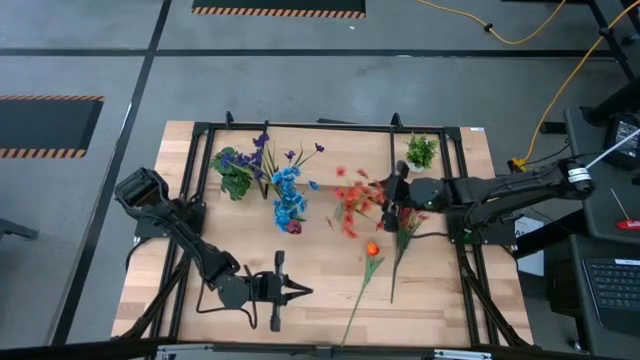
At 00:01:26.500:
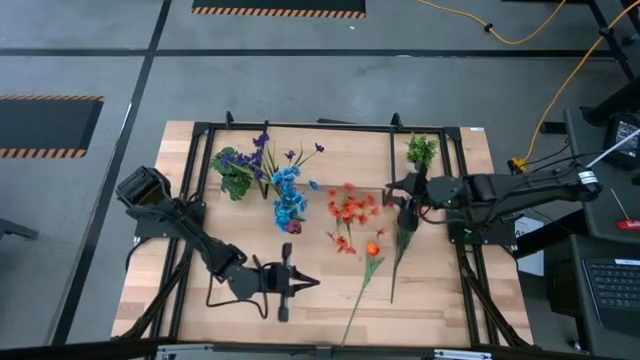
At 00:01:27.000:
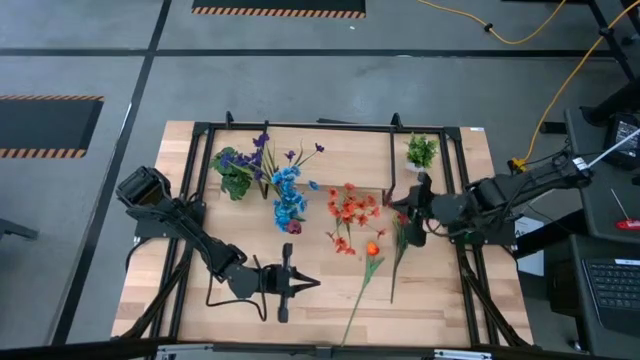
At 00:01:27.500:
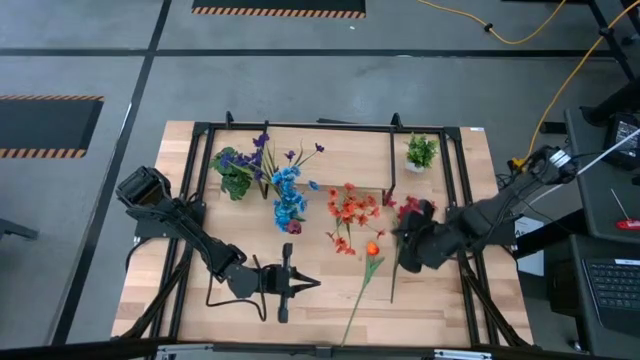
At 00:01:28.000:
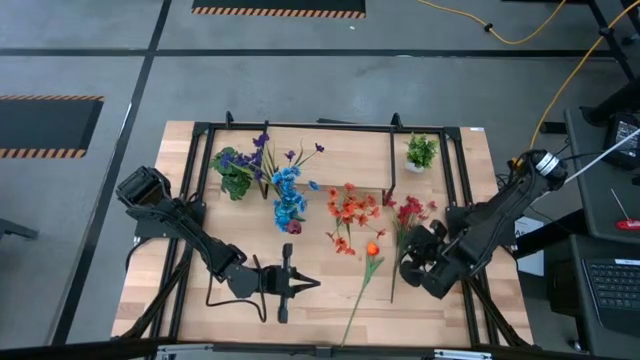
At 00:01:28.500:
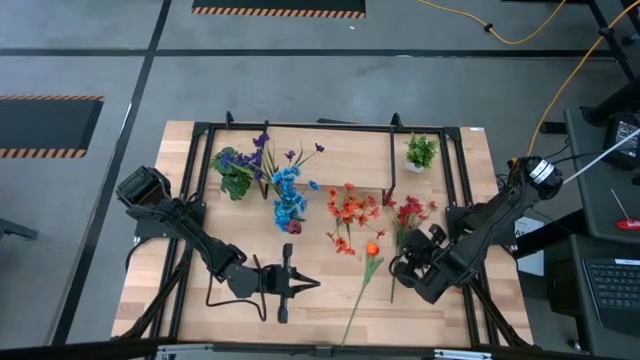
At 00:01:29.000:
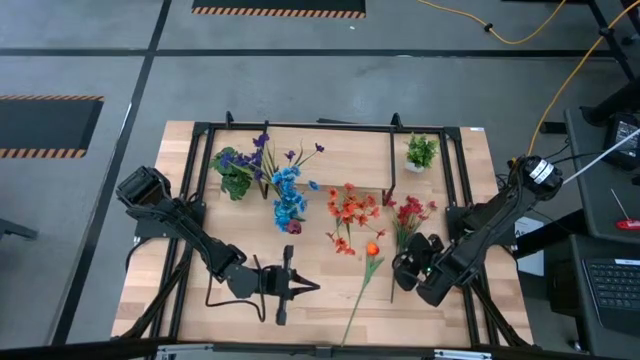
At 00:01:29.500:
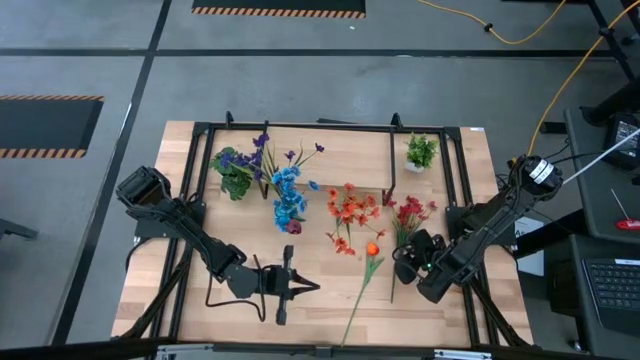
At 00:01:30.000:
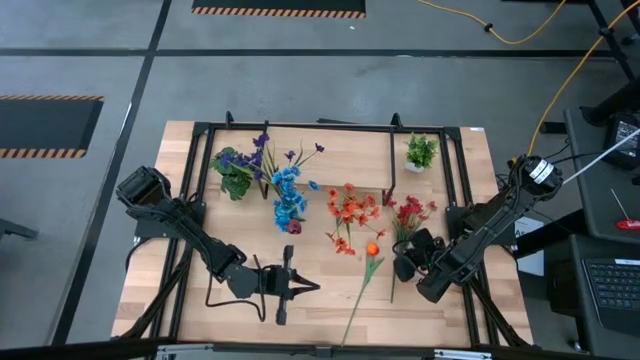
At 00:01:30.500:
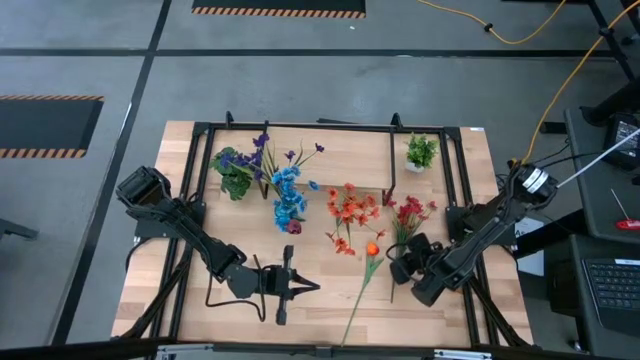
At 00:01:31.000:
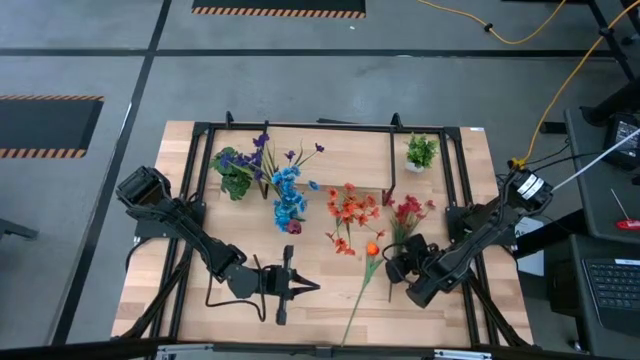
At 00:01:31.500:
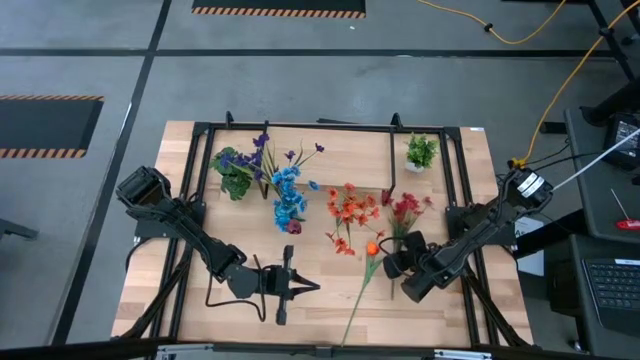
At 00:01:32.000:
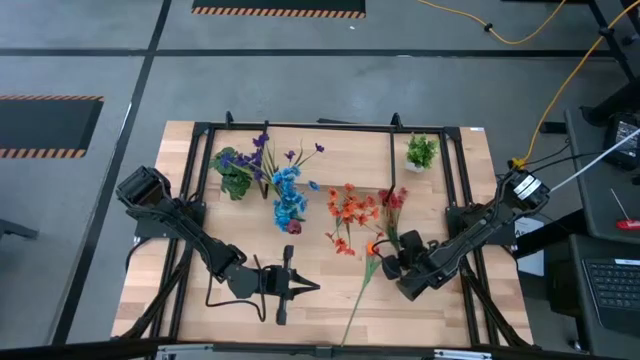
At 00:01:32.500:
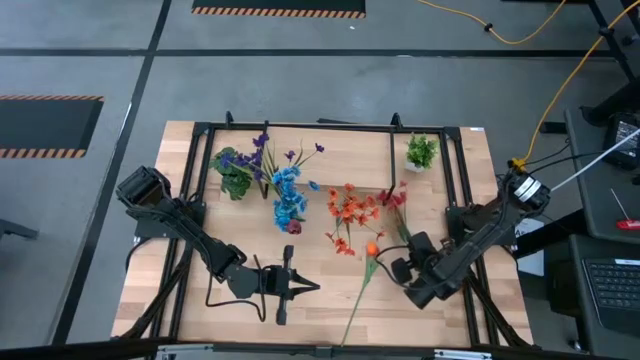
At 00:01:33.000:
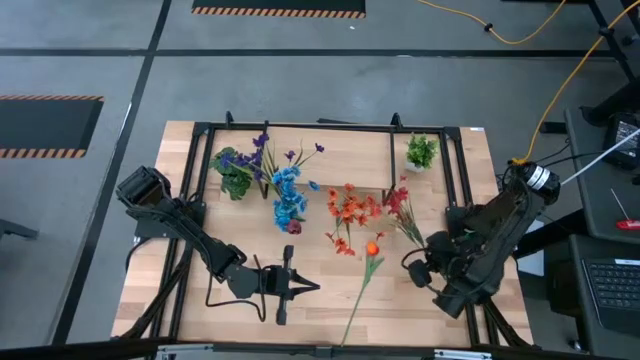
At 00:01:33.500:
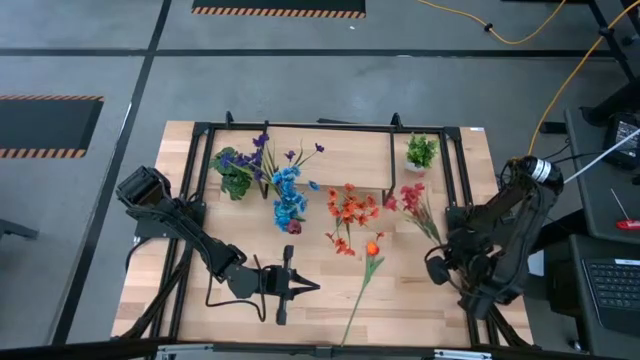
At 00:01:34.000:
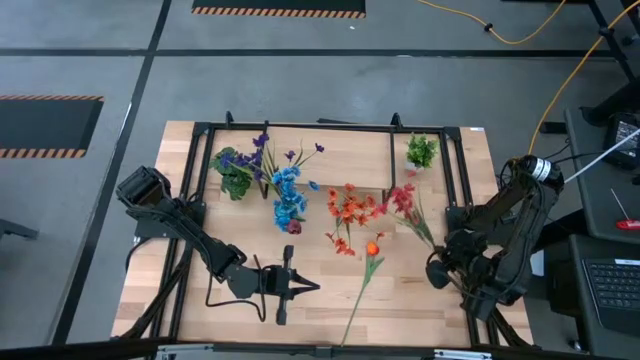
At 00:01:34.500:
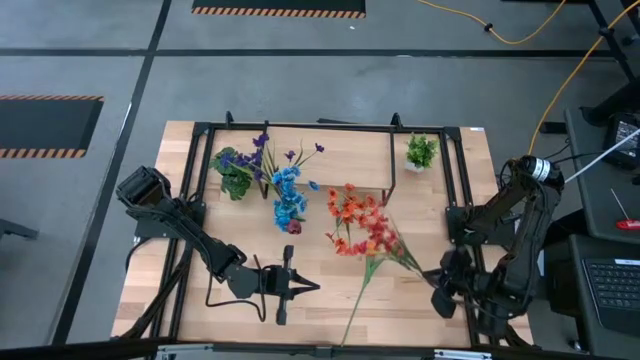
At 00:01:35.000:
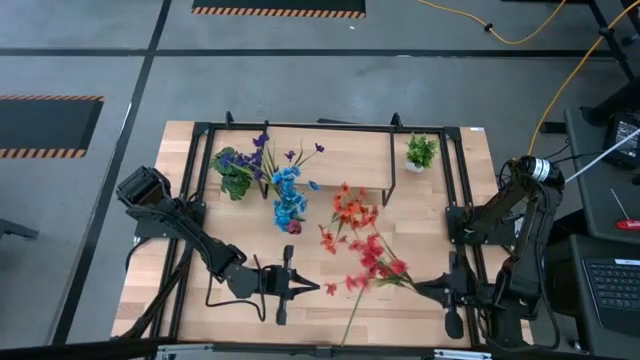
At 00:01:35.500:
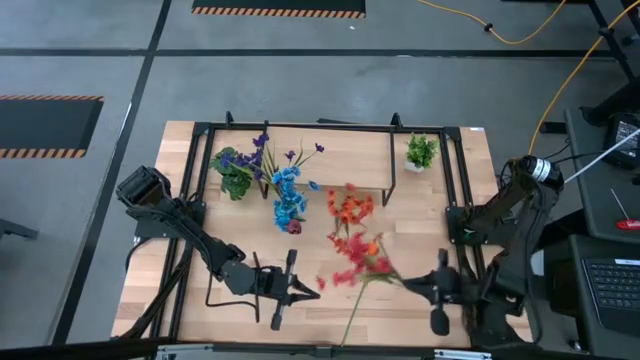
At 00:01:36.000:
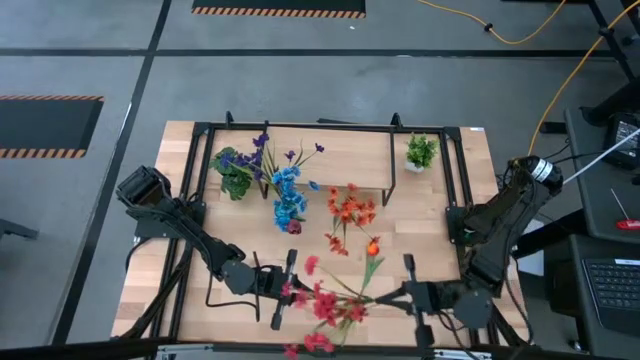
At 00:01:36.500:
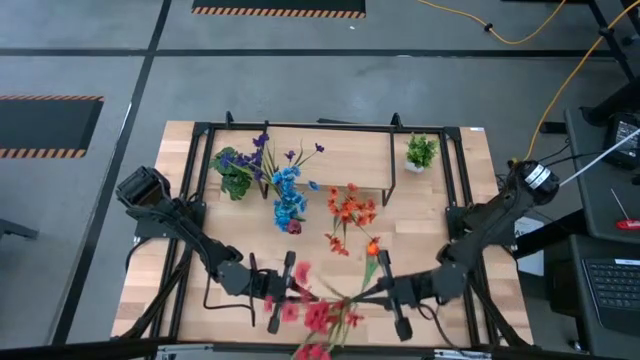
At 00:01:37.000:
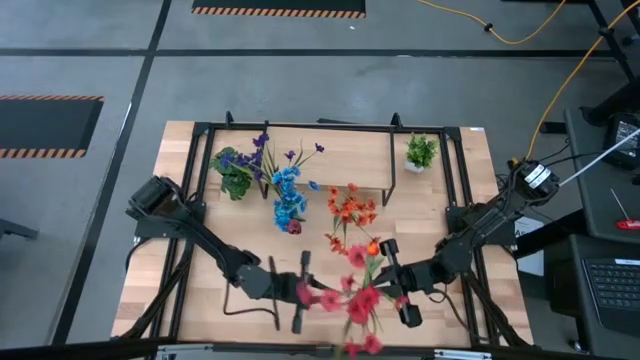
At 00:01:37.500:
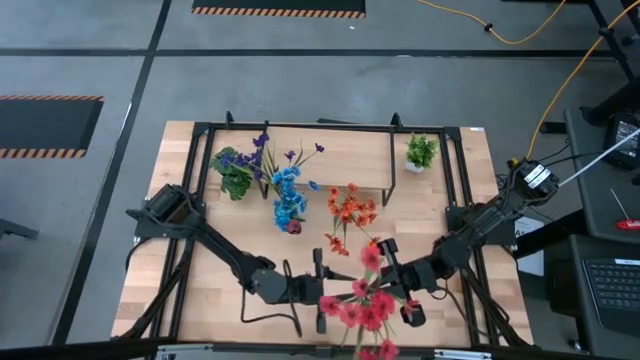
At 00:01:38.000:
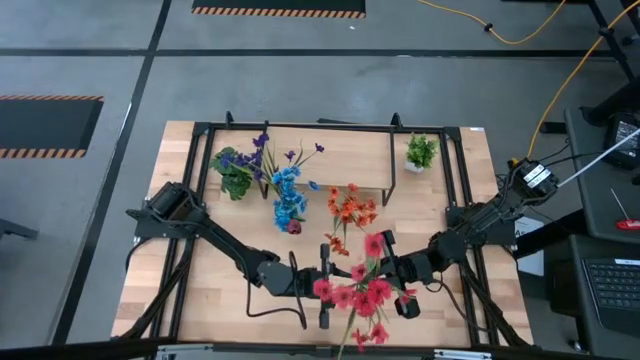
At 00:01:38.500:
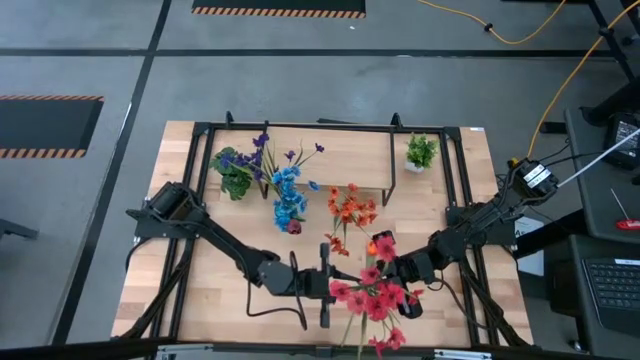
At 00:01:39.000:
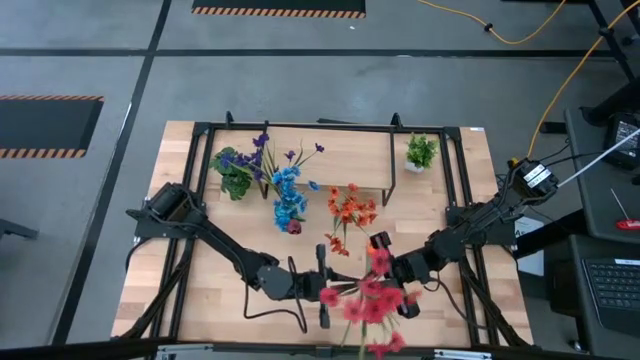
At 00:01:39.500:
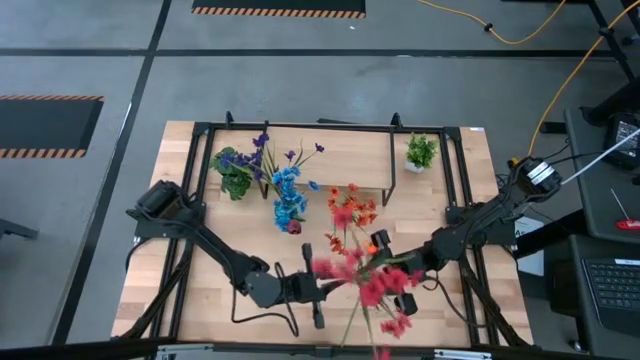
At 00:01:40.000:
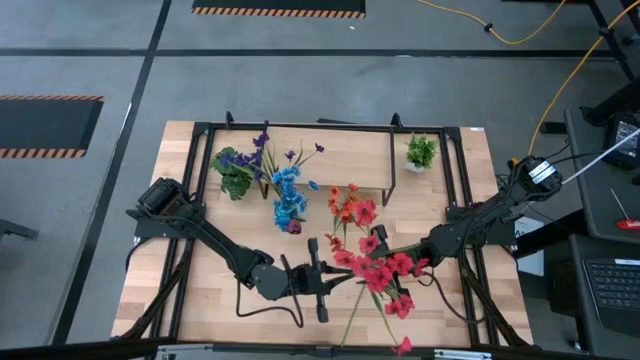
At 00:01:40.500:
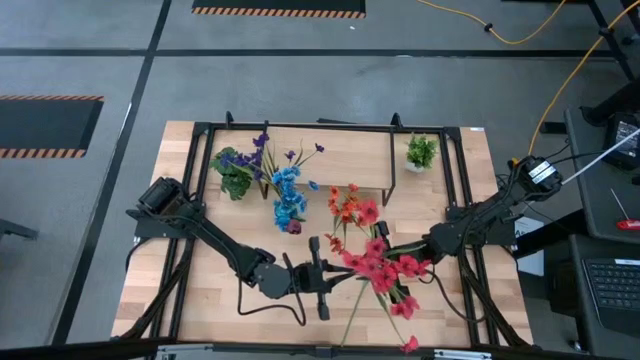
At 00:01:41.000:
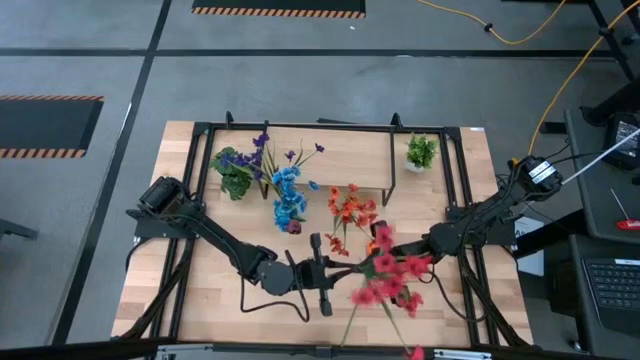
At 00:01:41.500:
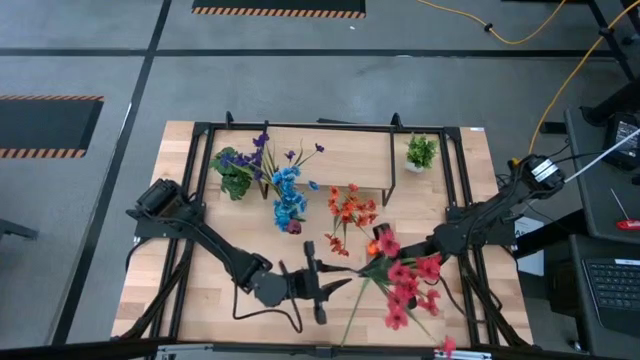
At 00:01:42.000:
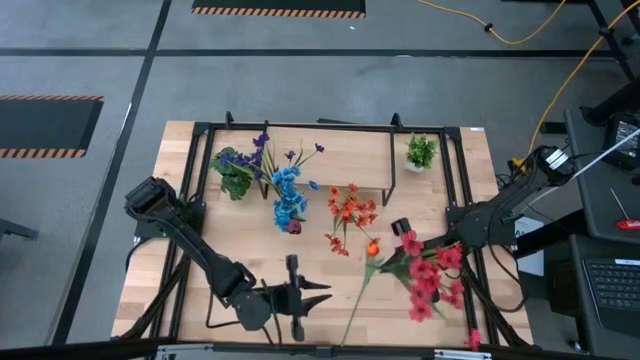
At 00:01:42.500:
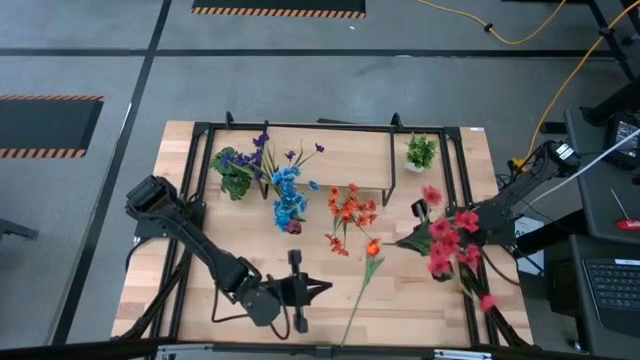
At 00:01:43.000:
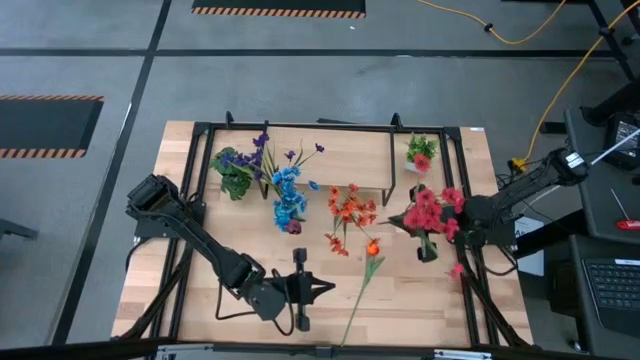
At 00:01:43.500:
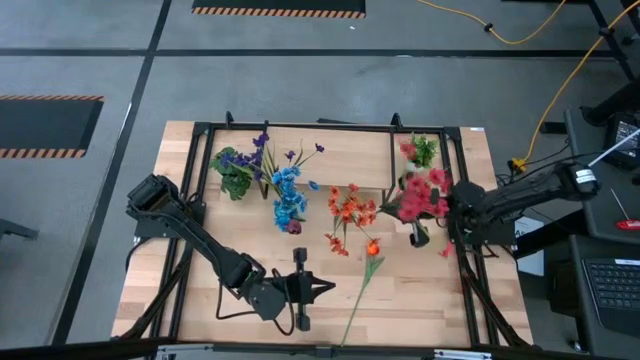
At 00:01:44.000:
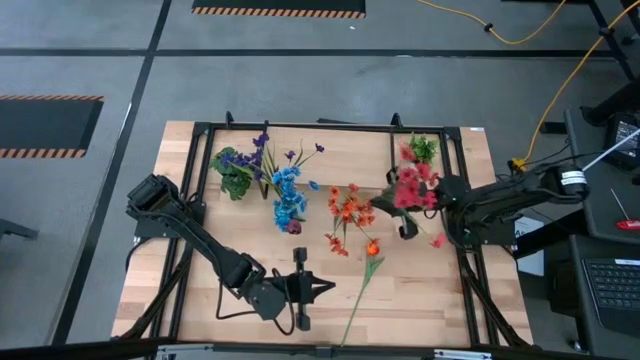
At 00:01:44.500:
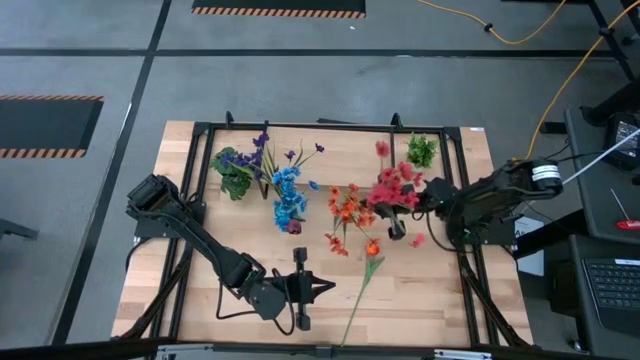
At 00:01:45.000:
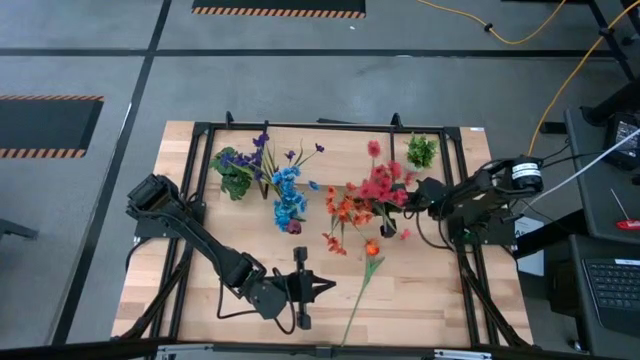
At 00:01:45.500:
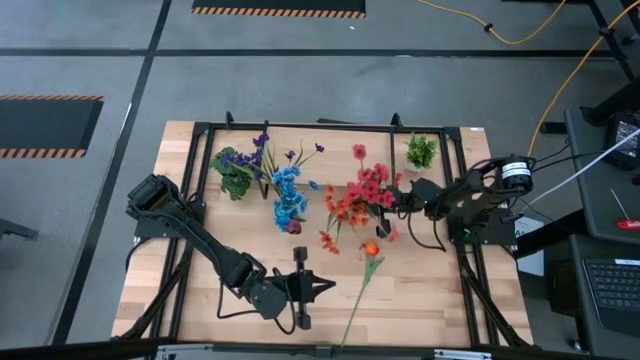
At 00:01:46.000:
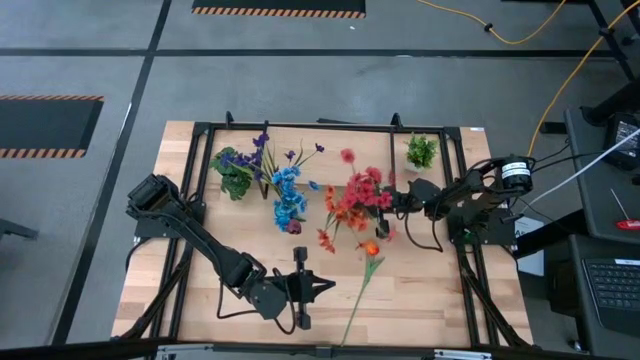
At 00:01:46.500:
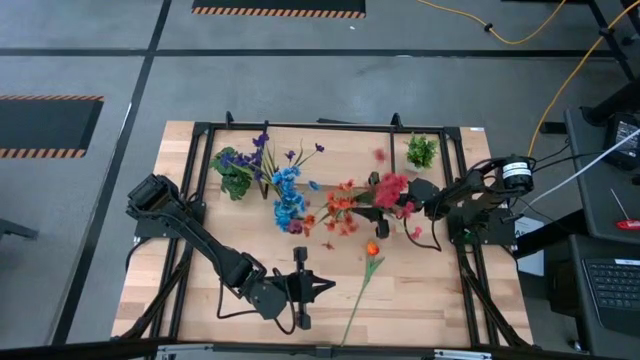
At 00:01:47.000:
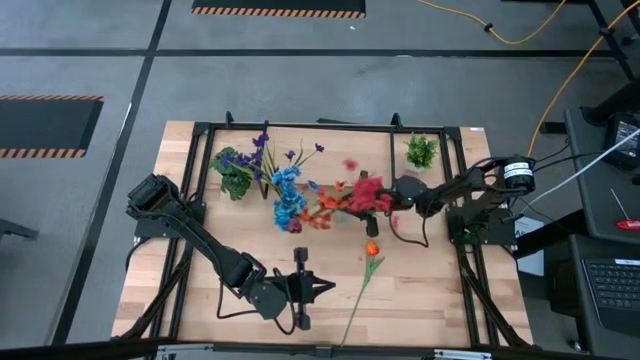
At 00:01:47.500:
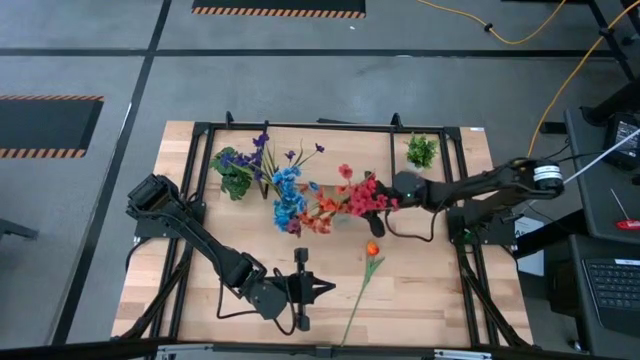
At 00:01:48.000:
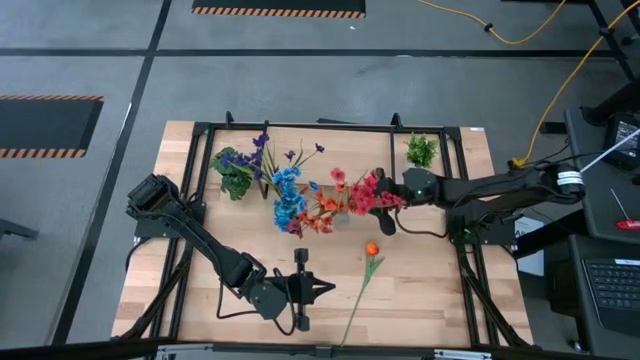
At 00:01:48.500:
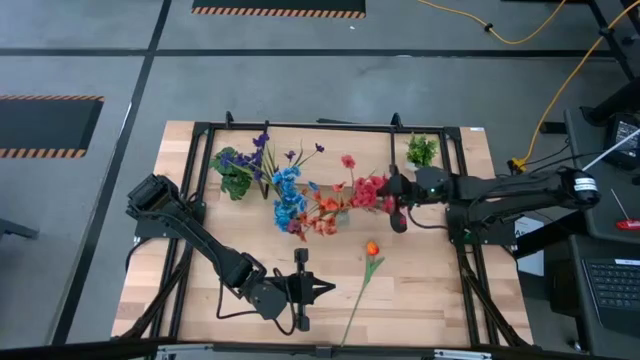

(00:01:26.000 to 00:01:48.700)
Task: Pick and place flowers into a vace then onto a shelf
Put the red flowers into the transparent vase
